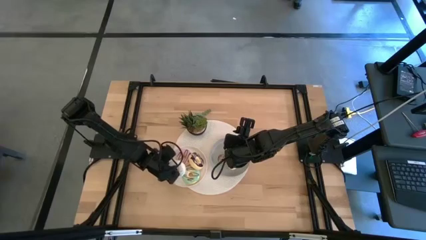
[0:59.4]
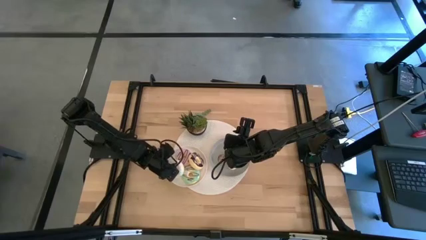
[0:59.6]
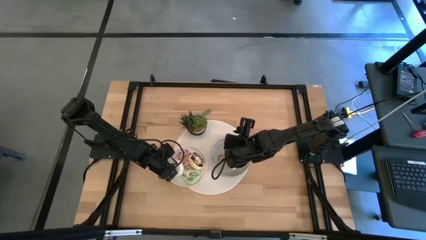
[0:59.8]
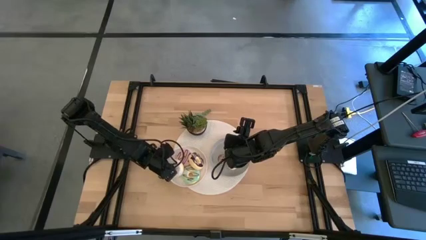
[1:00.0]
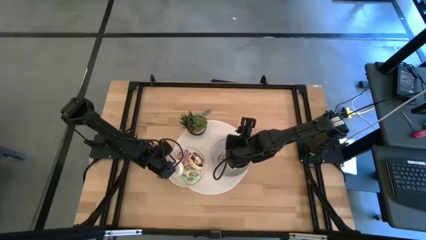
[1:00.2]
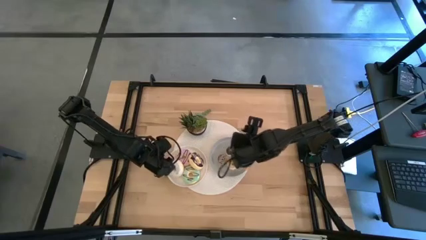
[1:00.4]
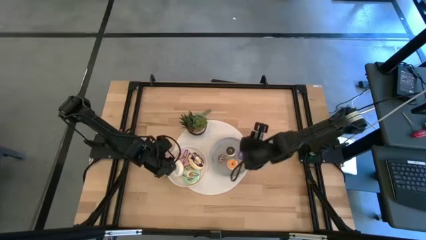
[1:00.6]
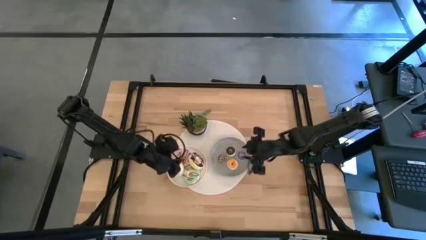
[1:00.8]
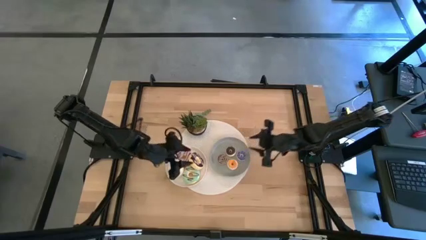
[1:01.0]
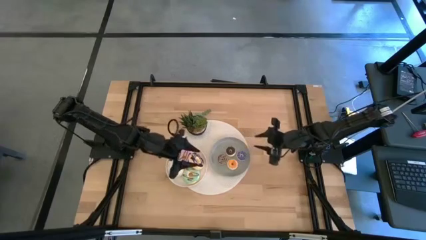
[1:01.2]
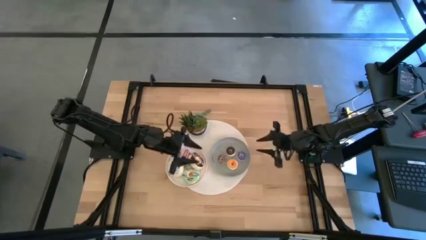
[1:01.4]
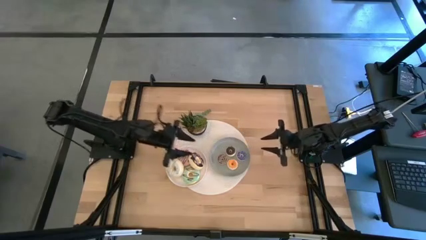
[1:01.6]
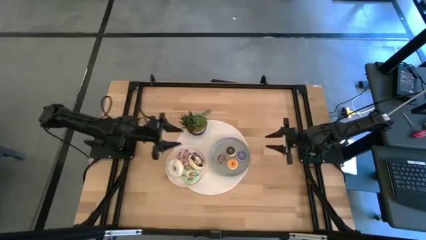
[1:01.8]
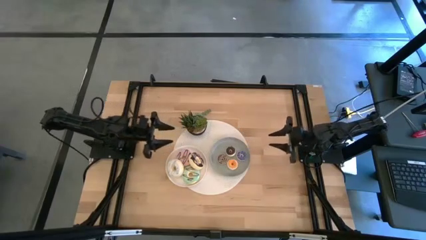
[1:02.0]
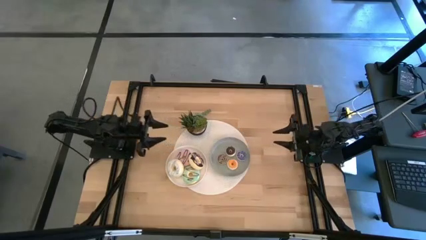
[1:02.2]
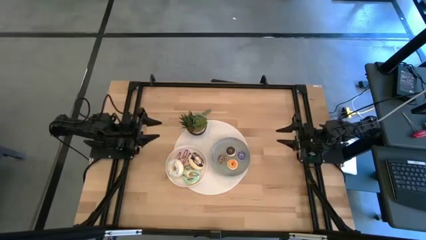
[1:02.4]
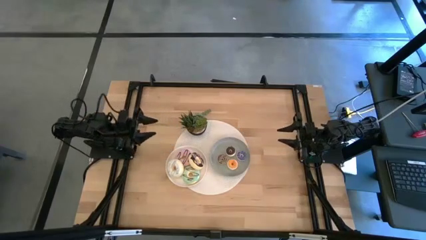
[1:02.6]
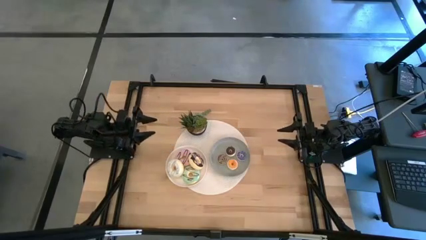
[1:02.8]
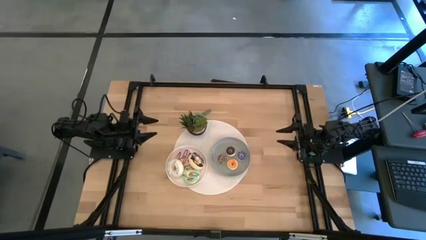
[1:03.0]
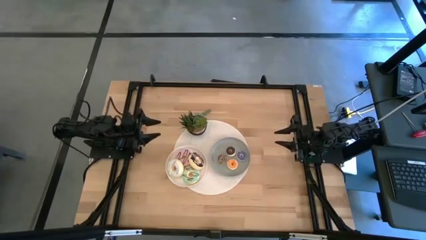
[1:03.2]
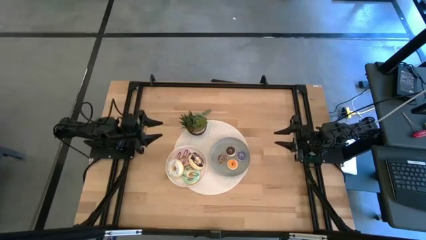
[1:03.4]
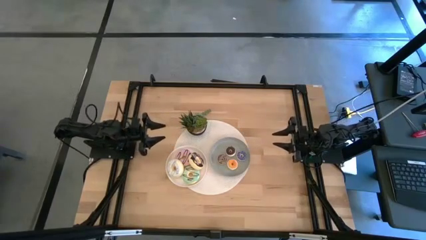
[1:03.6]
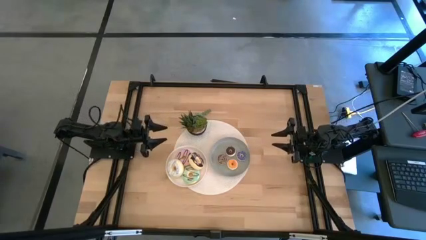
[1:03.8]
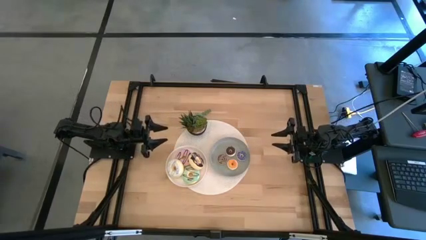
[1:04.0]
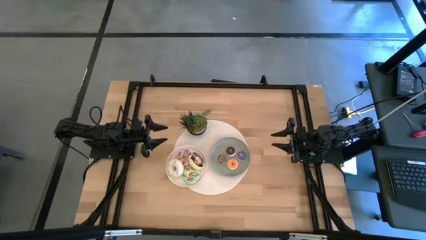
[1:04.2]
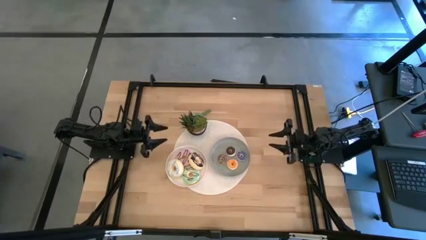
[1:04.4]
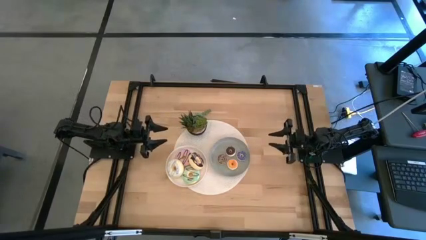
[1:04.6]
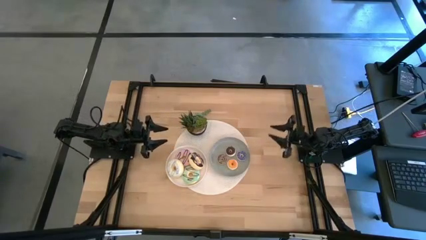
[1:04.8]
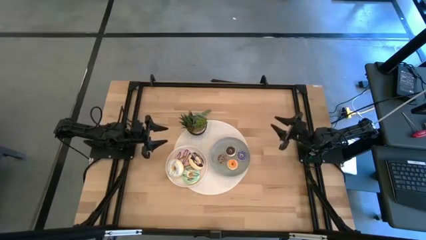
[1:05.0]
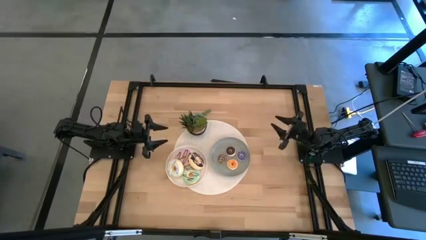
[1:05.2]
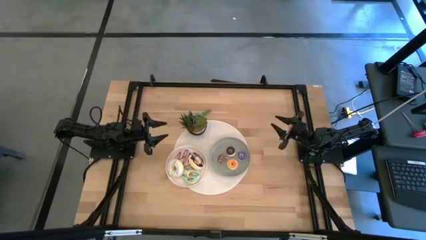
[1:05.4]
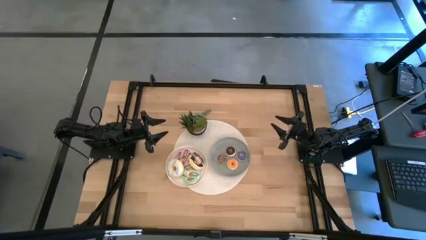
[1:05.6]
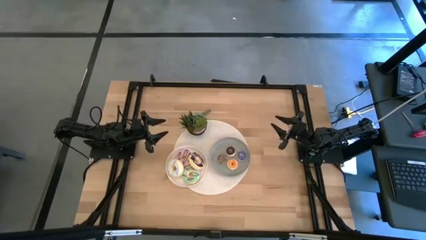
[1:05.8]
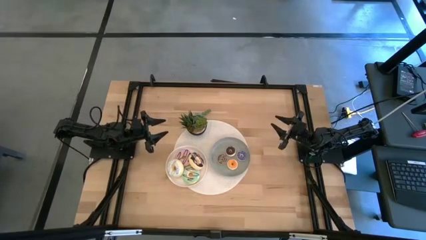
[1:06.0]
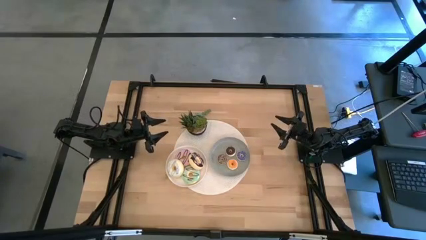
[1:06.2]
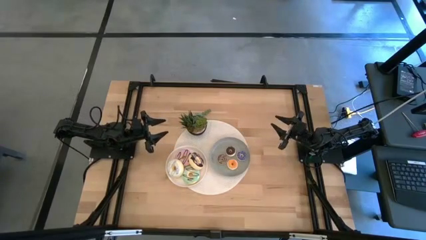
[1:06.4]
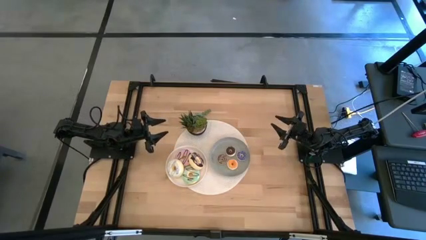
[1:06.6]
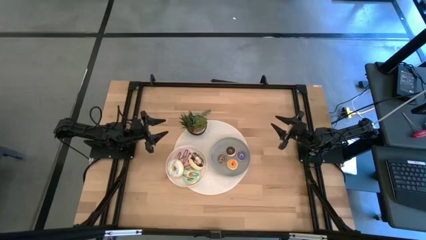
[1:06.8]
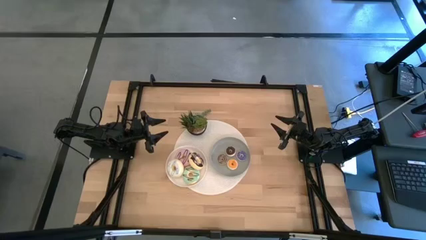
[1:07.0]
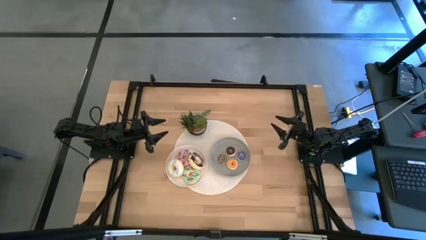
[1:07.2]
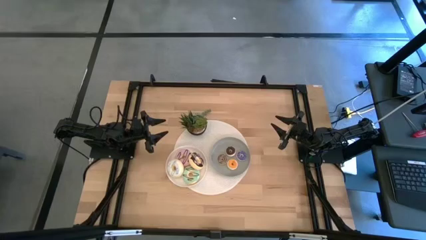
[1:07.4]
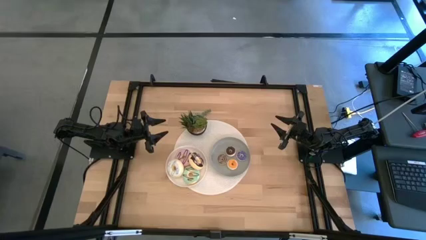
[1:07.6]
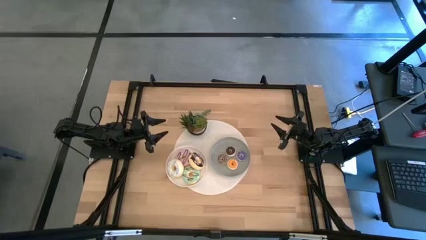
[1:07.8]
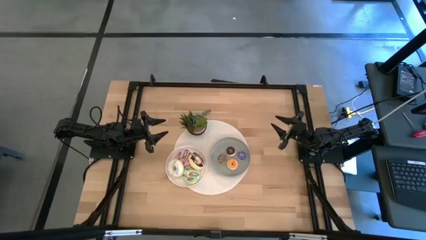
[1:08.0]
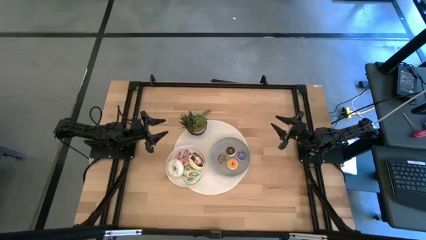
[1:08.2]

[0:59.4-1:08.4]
Task: Pick & Place donuts
Return to Home Position

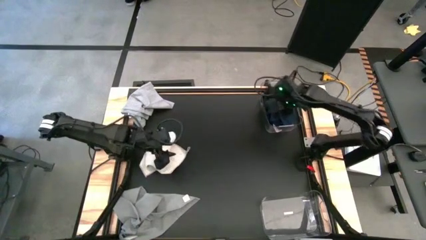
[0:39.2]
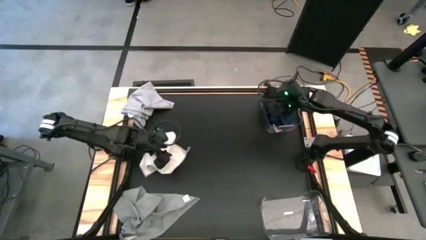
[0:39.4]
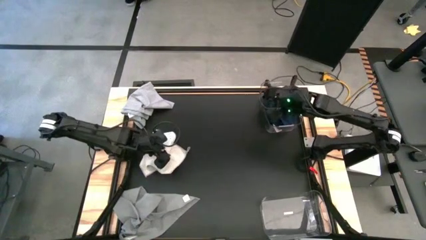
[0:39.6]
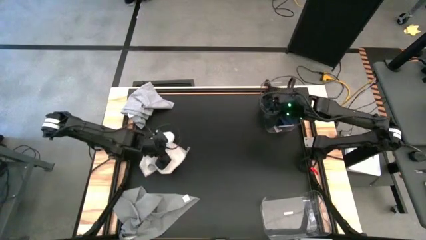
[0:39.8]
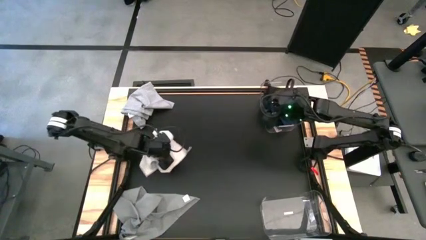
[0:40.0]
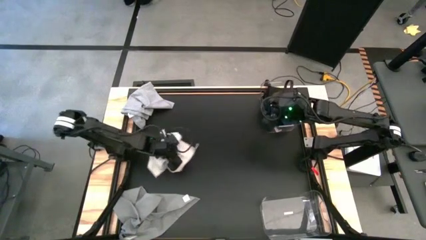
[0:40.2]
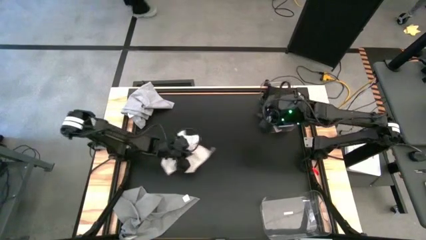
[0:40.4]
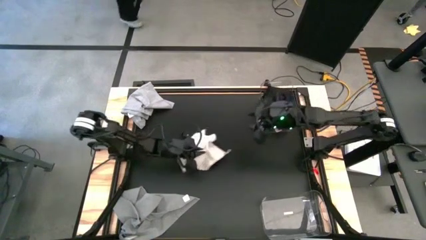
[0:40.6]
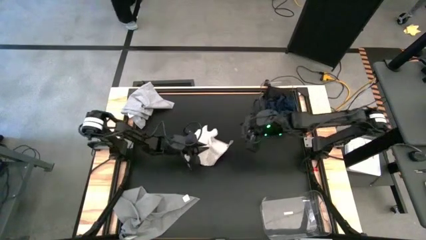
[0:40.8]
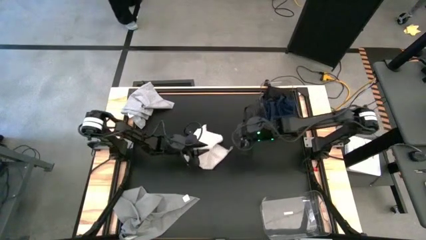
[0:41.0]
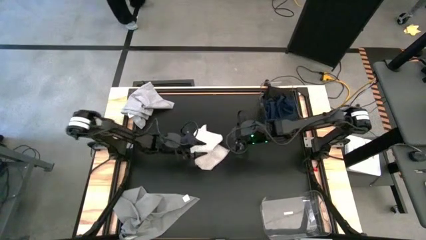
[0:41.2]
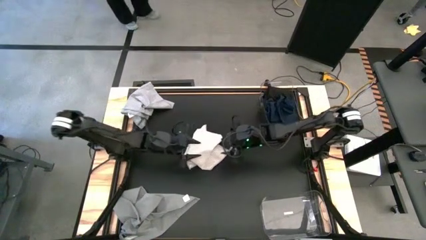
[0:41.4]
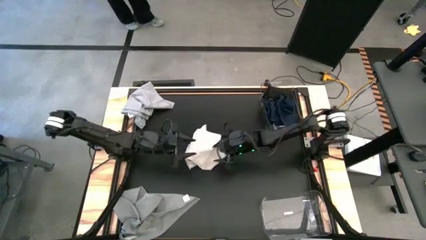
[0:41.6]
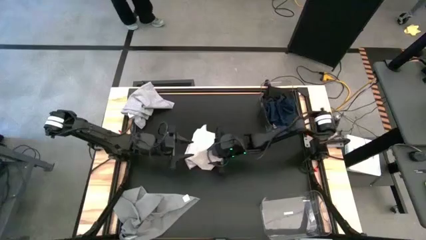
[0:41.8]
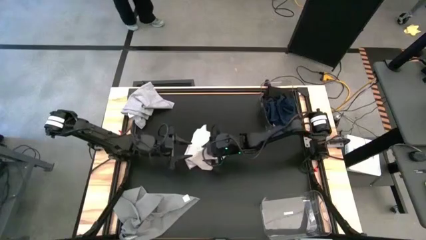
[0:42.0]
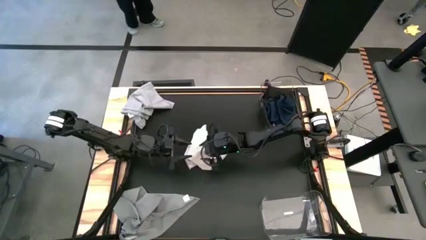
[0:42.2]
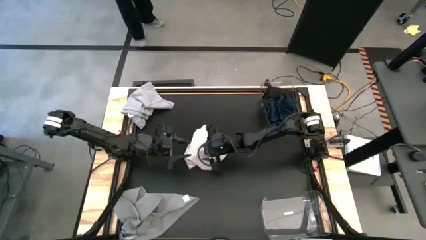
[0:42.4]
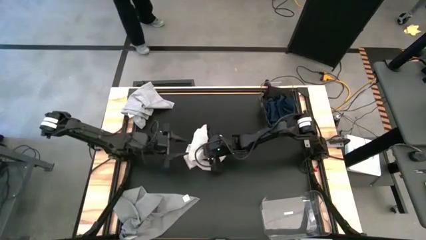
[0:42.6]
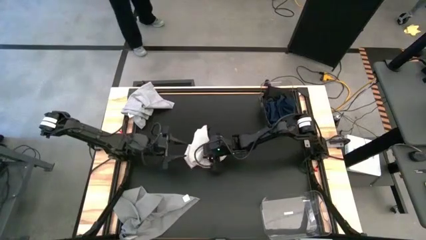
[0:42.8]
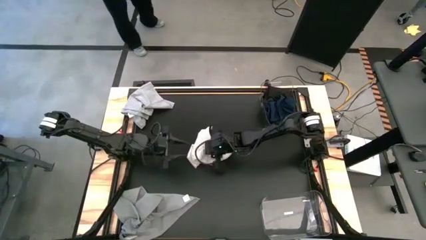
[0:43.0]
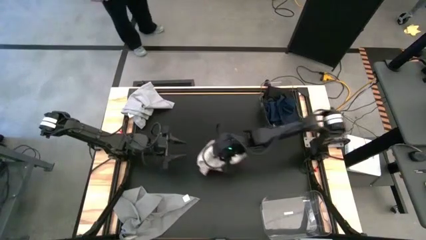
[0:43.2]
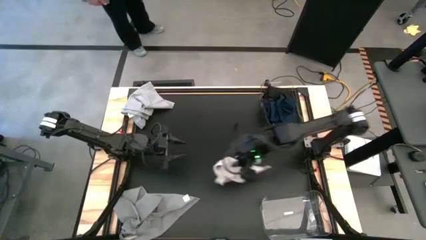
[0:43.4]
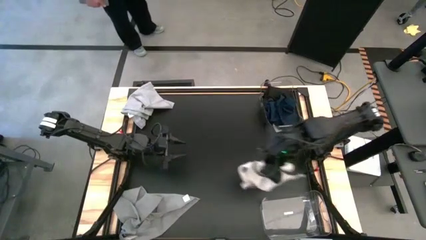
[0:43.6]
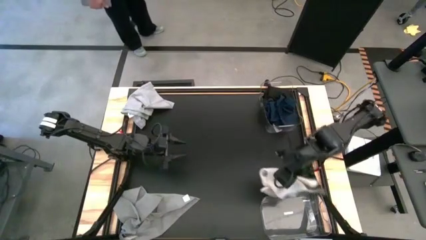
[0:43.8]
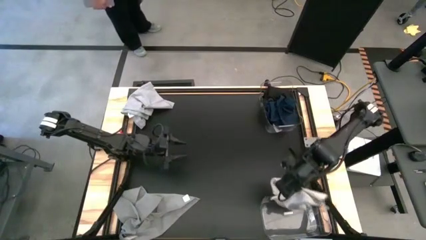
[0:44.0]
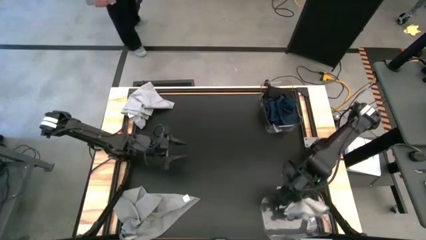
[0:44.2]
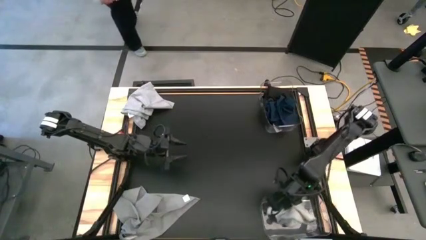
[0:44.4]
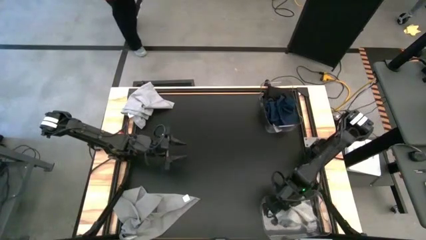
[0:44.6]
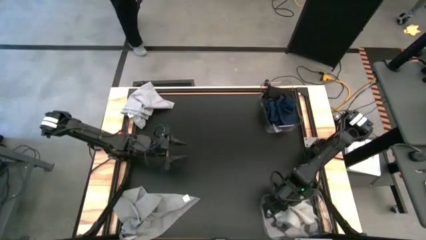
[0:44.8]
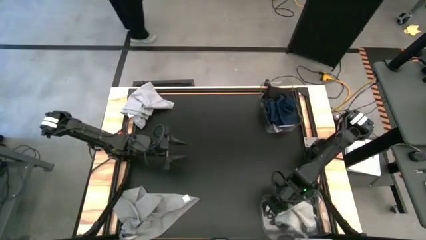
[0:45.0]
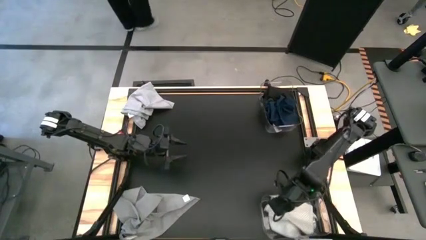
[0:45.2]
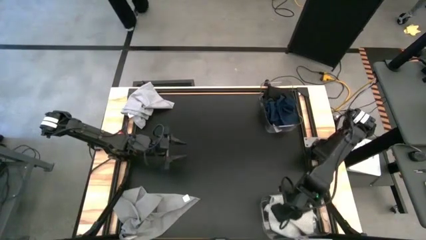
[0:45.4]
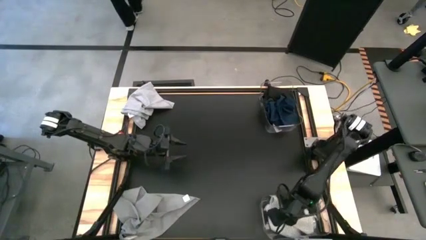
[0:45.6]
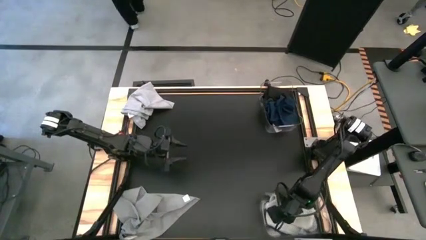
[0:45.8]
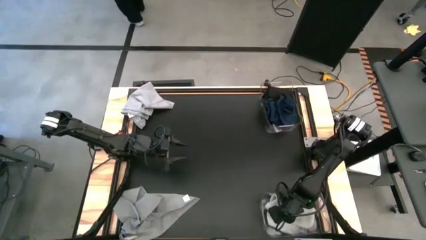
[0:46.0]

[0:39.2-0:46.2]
Task: Sort towels by color in basket
Put the light gray towel into the bottom transparent bin
